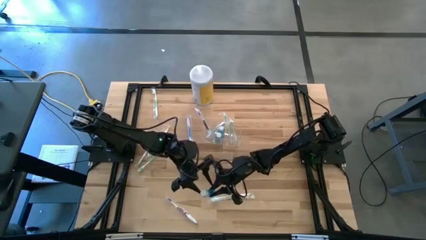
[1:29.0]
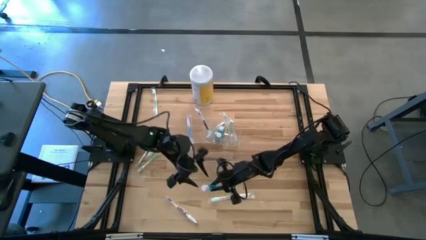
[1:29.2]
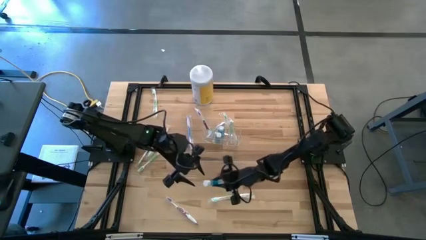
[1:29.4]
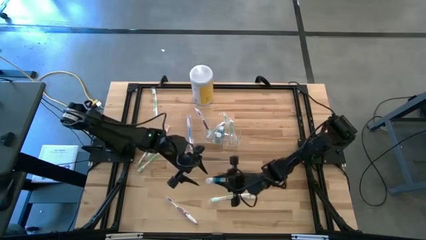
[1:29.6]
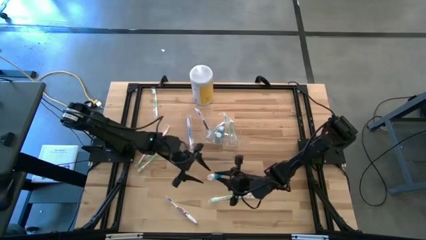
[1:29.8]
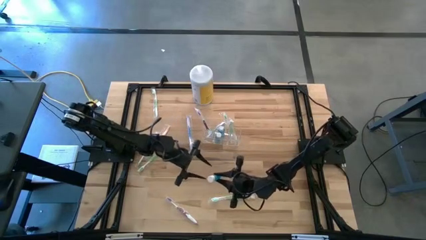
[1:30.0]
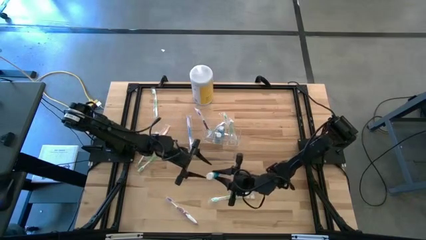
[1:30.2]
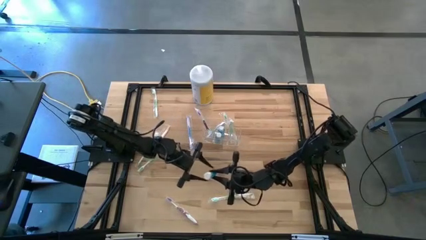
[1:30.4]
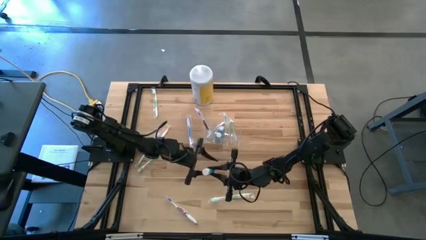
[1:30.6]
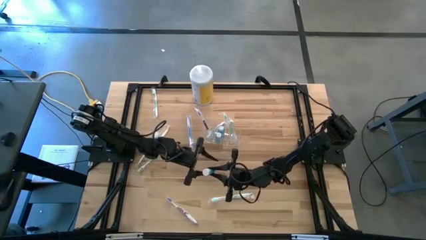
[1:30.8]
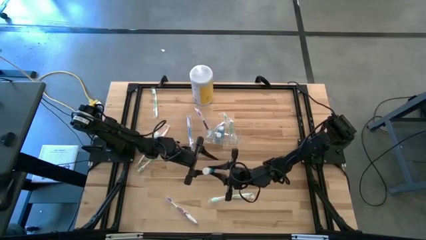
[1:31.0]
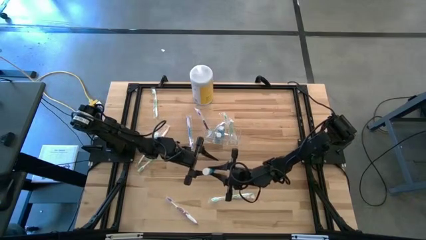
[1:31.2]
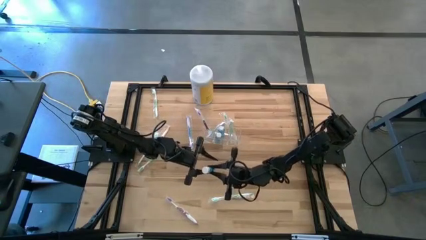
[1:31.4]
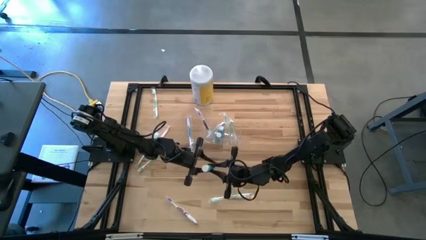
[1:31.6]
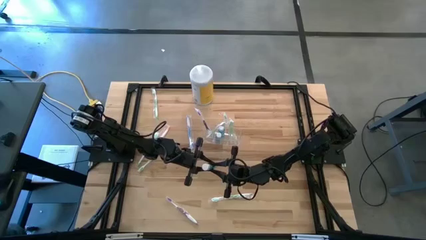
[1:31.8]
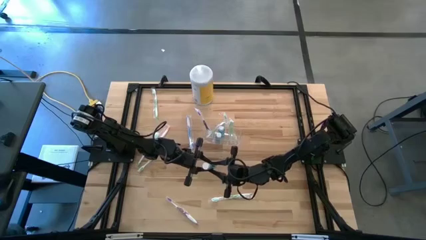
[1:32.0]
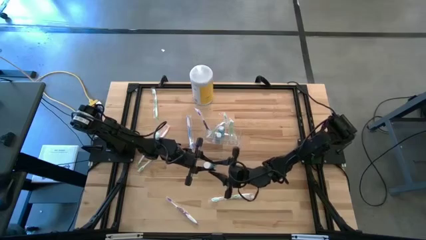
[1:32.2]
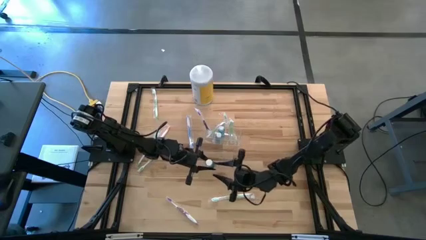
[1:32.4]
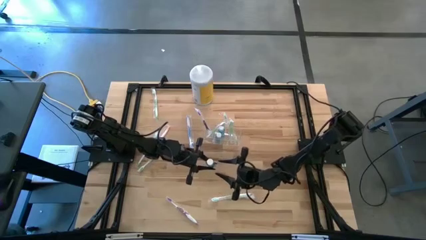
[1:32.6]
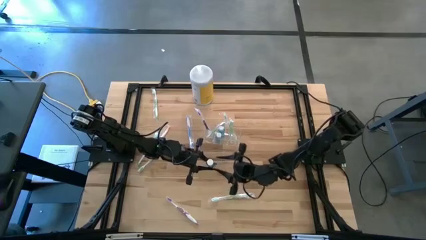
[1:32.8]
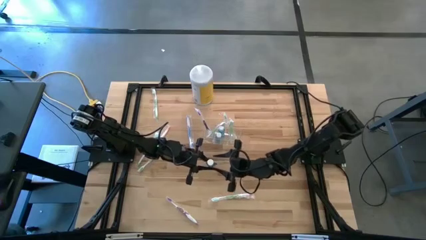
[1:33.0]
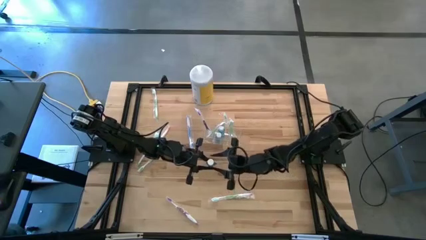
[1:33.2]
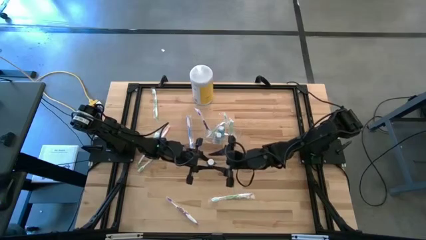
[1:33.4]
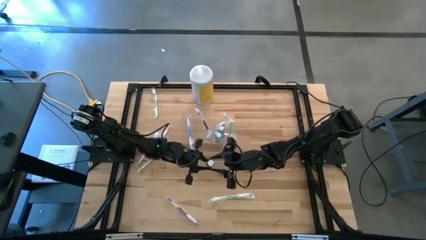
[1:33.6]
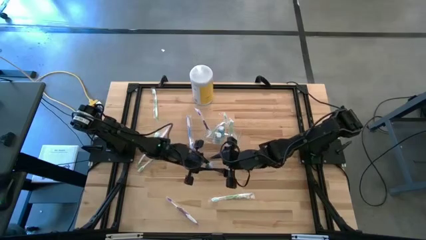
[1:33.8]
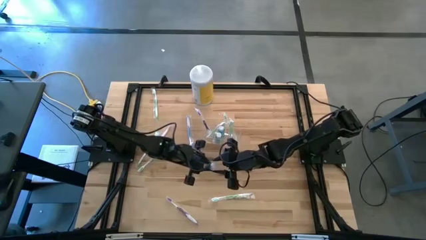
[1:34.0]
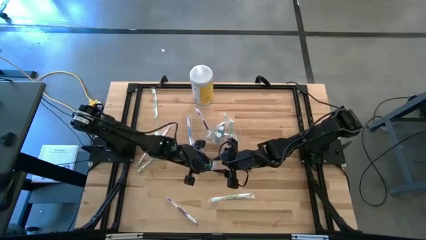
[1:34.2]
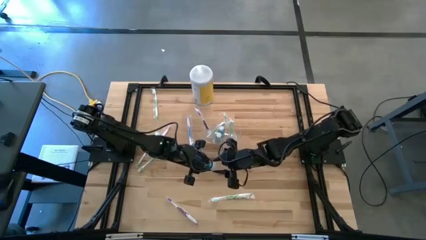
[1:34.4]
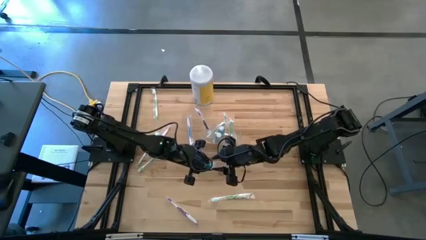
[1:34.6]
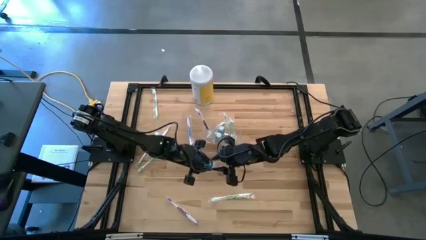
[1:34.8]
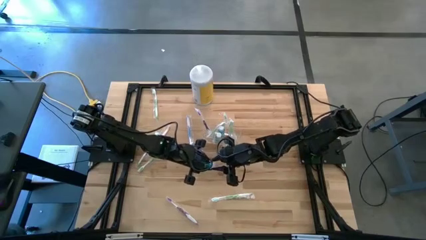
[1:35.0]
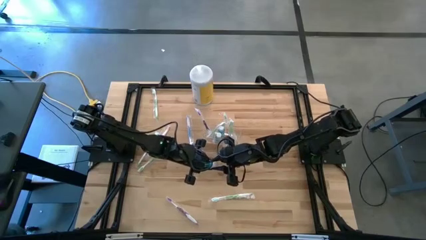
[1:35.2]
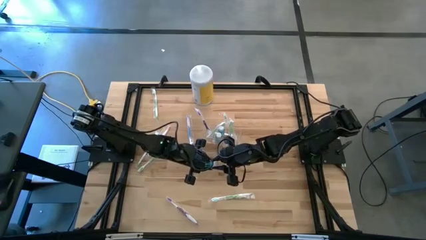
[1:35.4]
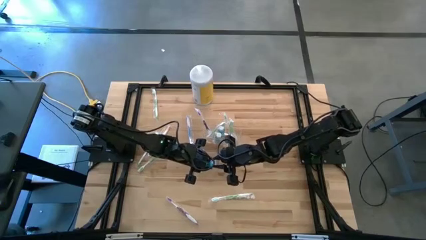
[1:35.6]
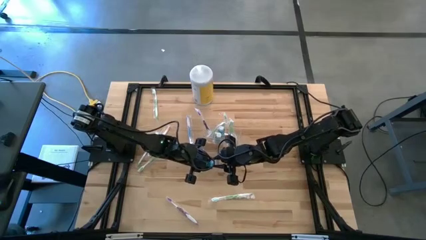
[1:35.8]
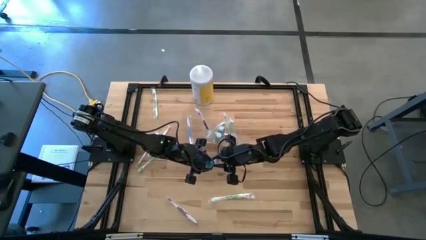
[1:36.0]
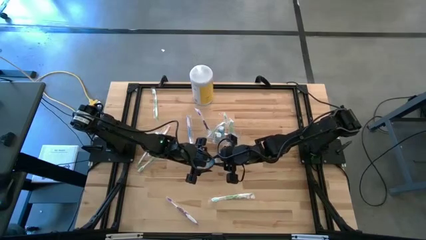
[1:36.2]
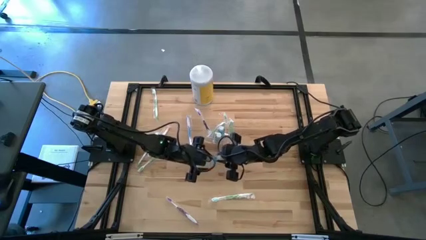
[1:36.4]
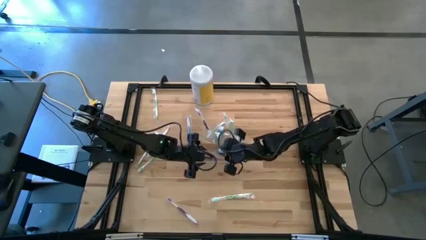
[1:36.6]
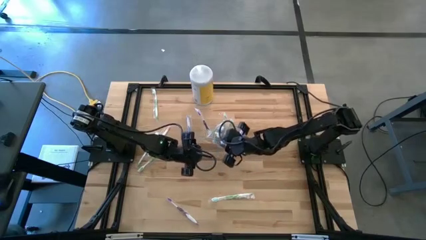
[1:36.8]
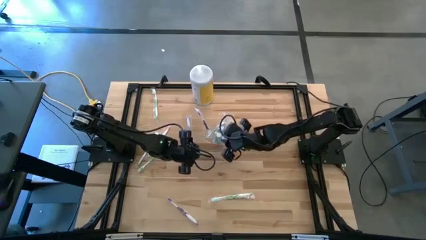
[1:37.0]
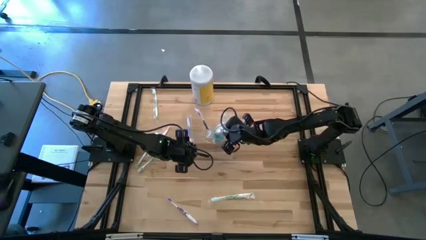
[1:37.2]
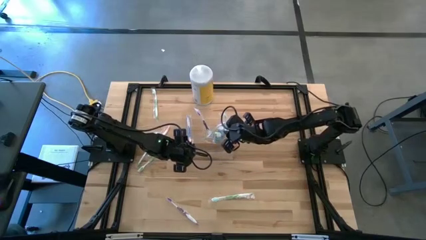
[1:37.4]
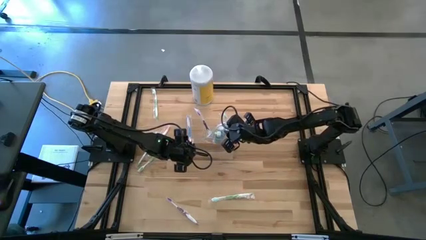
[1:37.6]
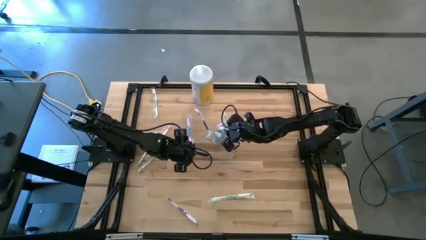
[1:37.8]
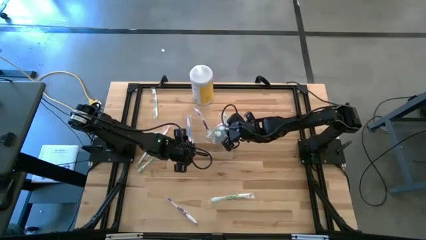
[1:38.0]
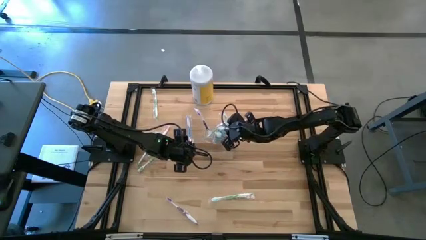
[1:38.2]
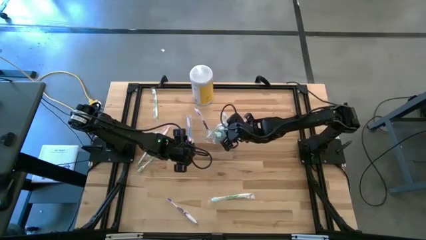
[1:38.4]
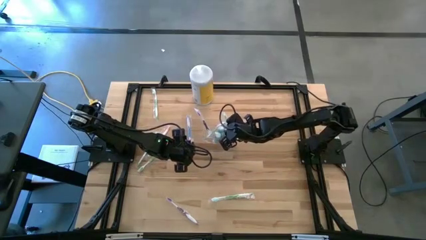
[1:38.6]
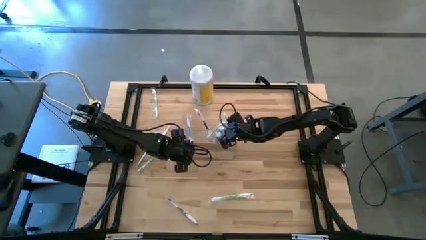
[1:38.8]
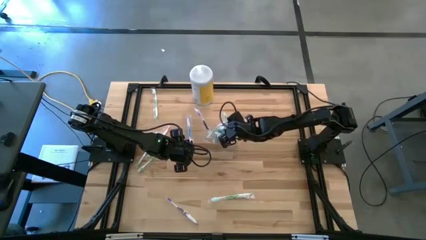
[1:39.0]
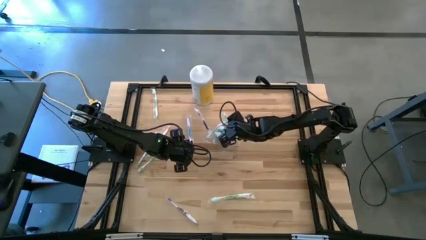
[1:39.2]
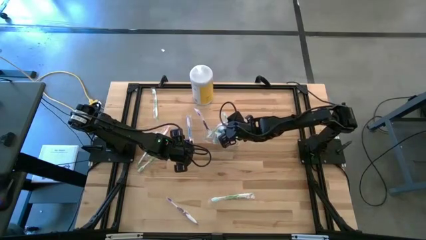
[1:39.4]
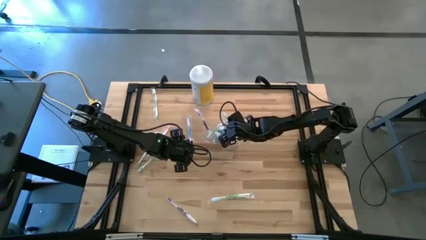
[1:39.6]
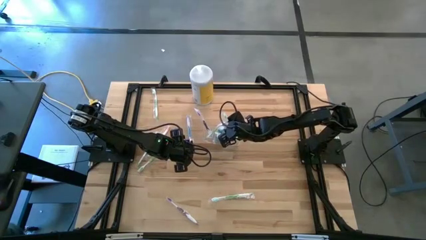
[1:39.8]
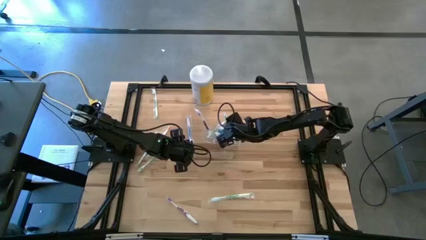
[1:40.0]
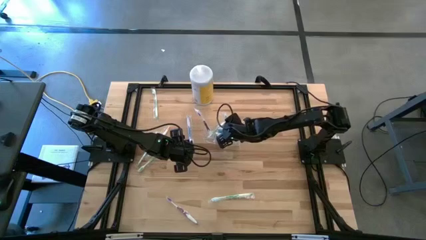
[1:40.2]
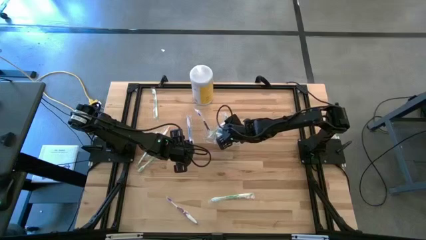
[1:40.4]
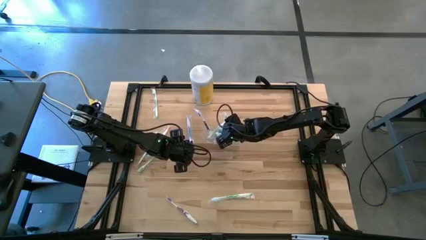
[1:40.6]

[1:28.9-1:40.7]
Task: Pick & Place toothbrushing station
Put the mouthwash into the middle section of the transparent organizer
